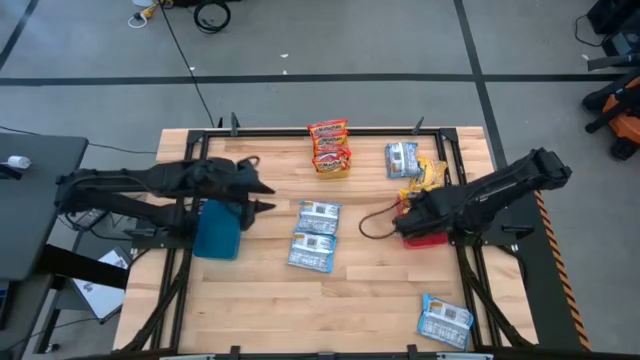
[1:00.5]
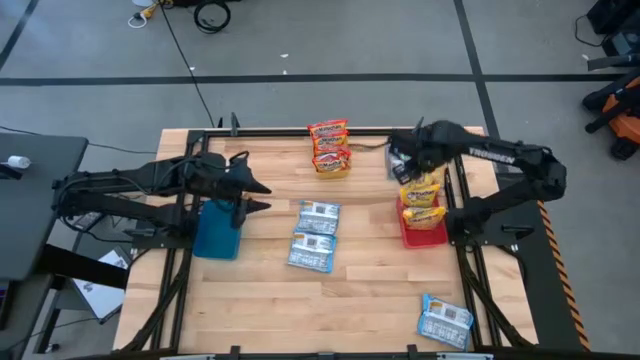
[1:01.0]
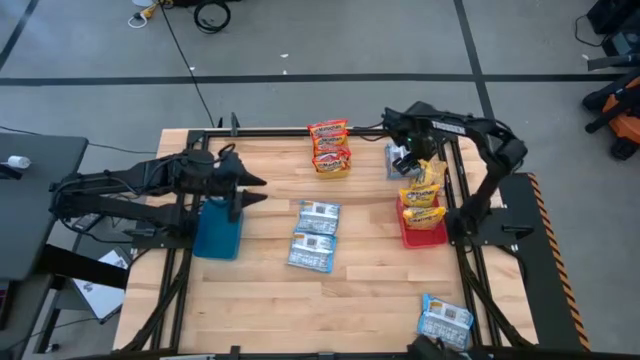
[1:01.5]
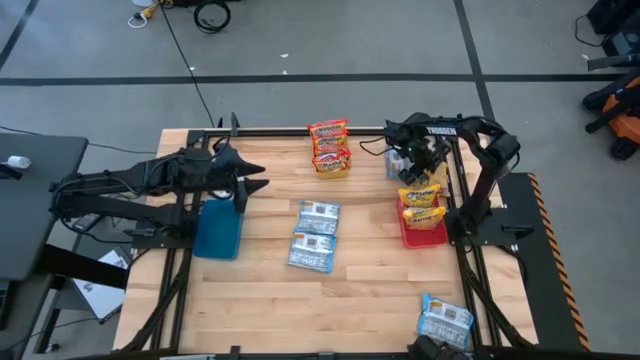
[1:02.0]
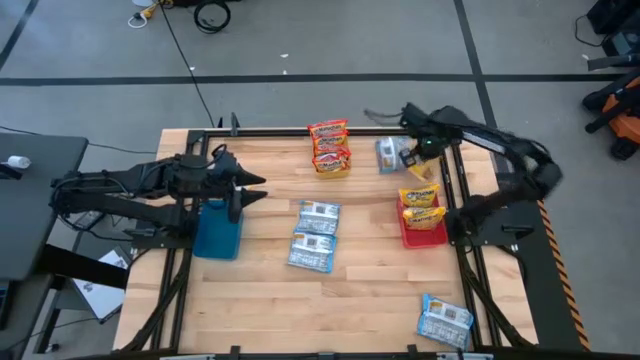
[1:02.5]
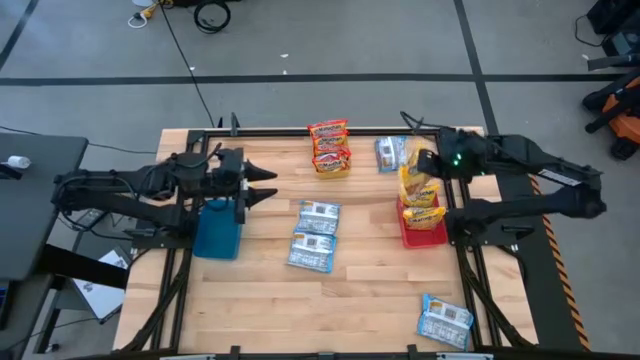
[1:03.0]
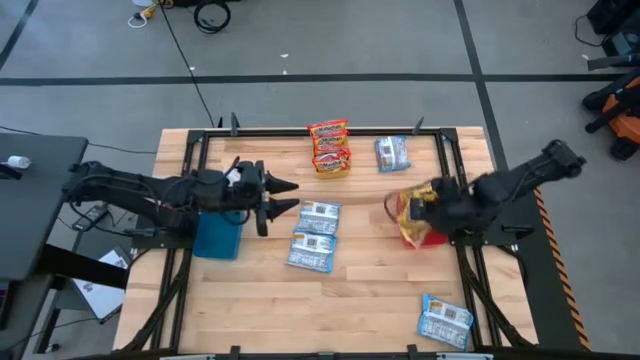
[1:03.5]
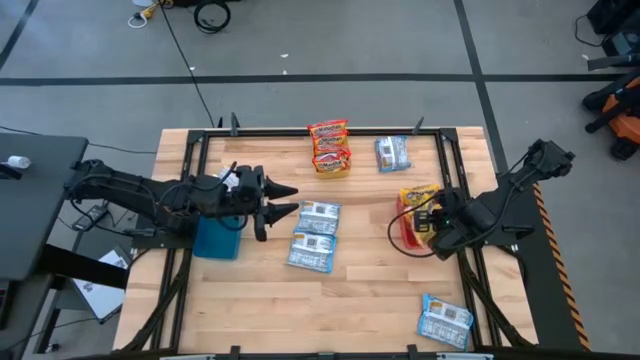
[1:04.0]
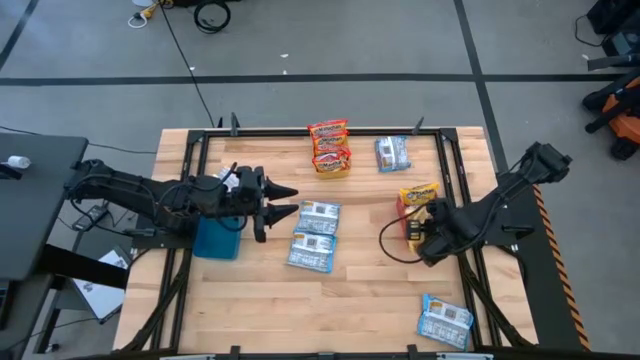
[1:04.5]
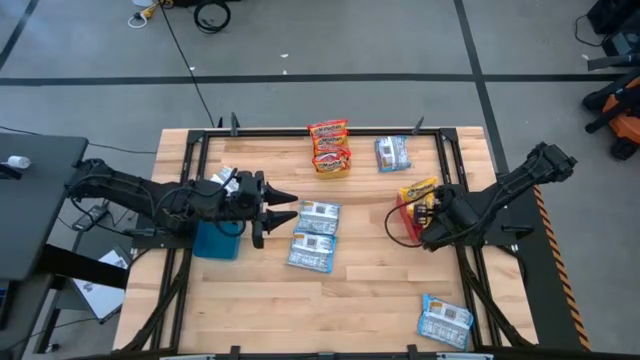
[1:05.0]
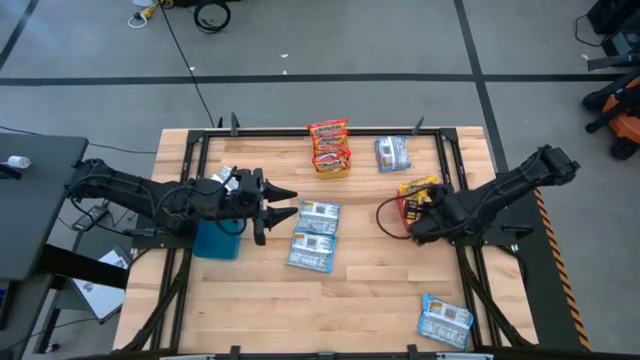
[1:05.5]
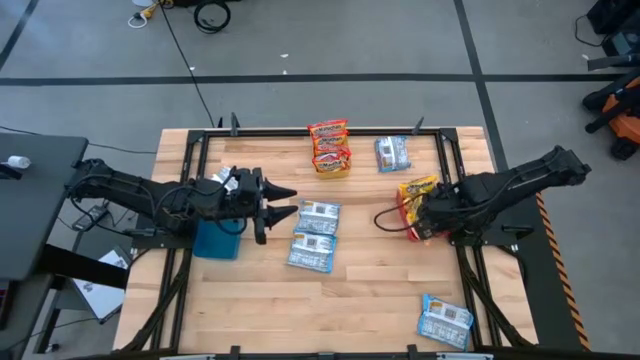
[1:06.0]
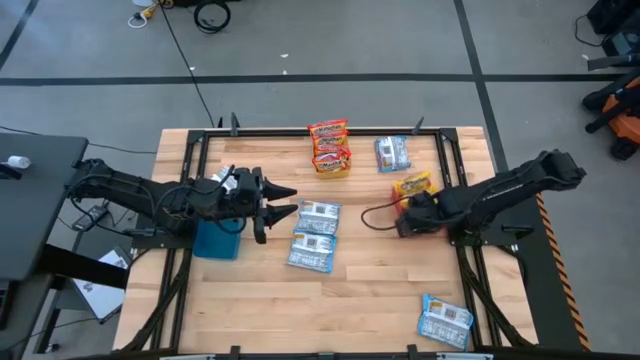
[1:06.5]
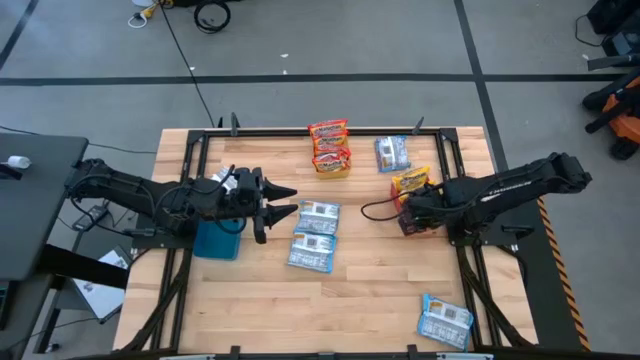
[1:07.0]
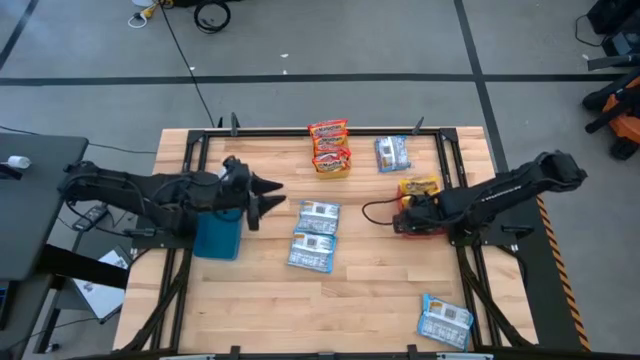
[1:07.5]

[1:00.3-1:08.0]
Task: Sort Maruchan noodles
Put the right yellow noodle pack into the red bin

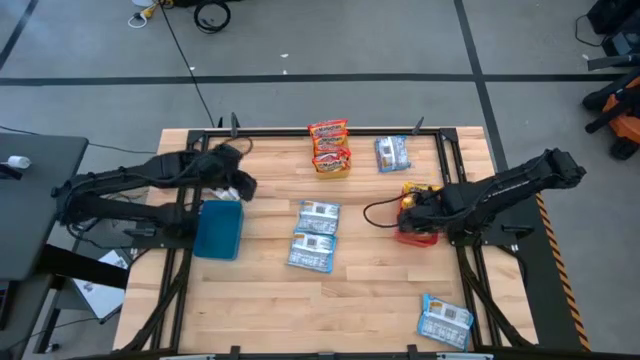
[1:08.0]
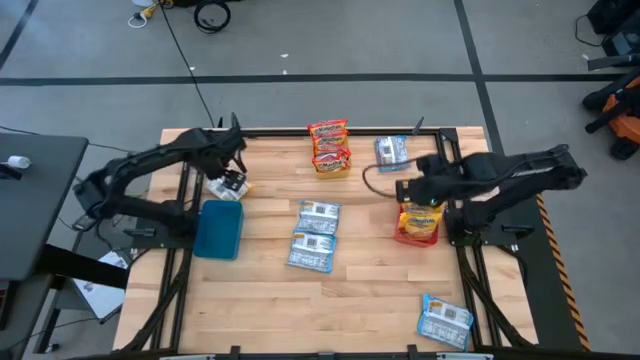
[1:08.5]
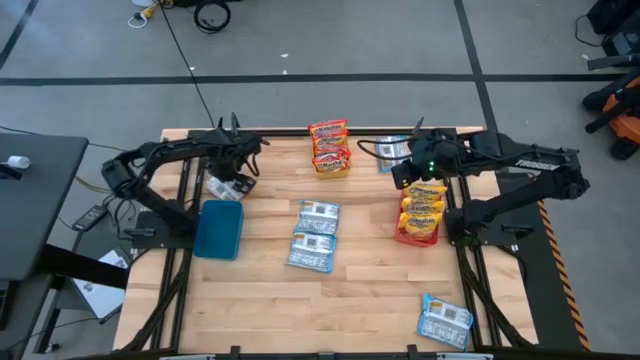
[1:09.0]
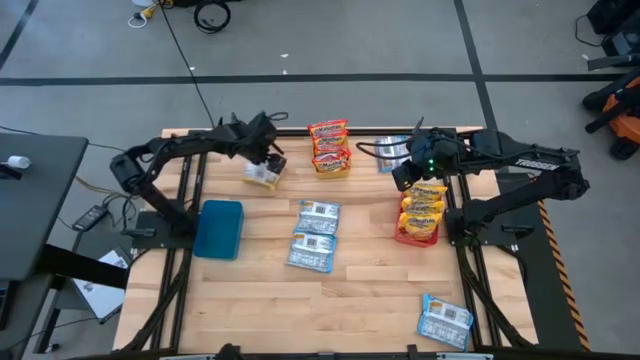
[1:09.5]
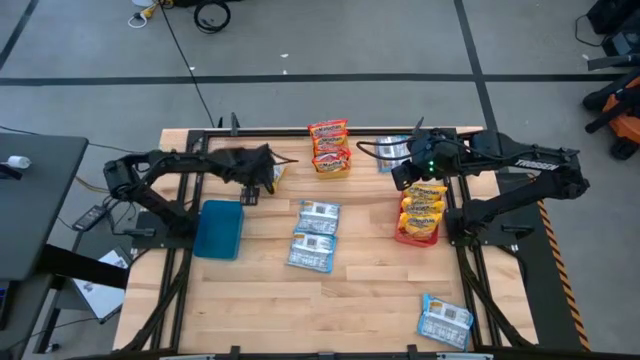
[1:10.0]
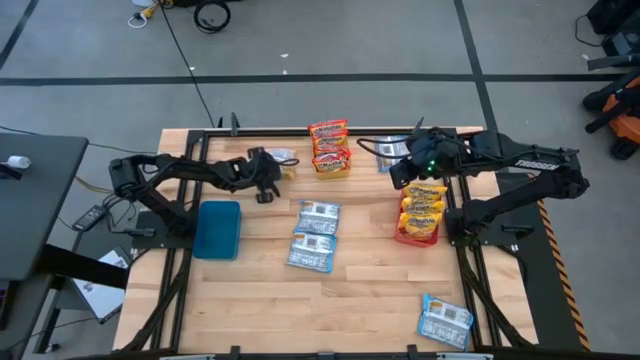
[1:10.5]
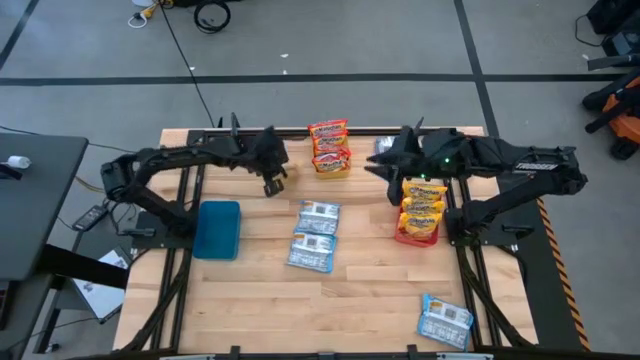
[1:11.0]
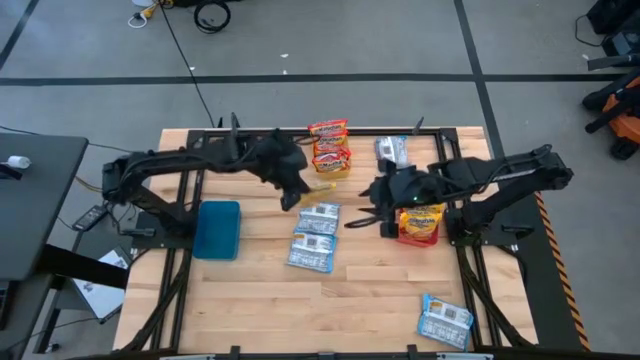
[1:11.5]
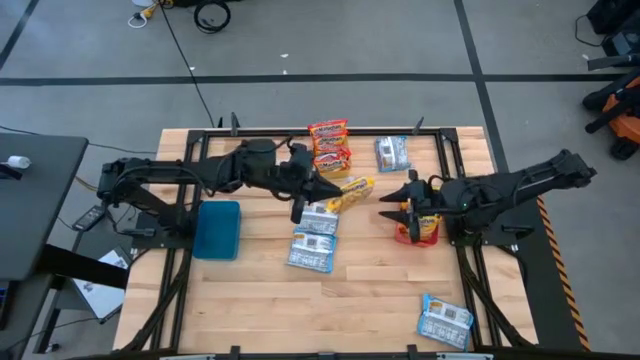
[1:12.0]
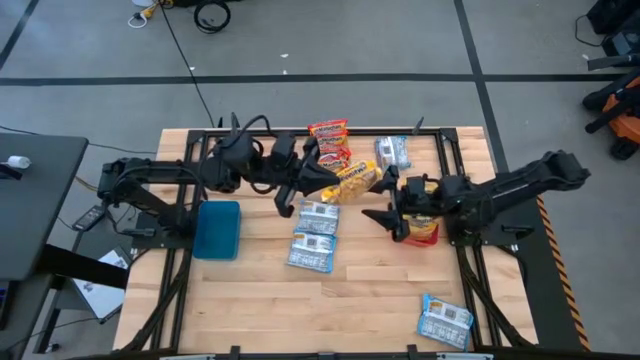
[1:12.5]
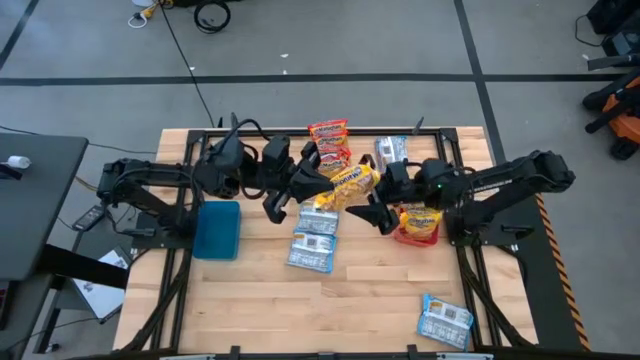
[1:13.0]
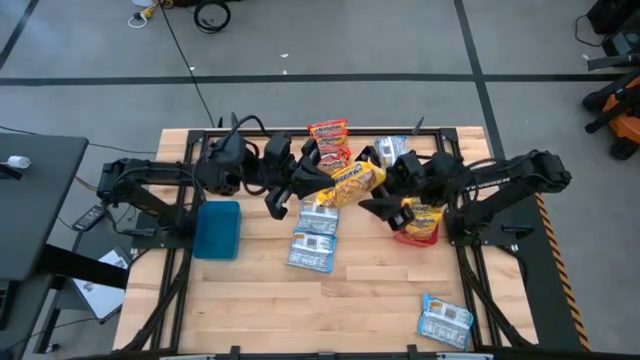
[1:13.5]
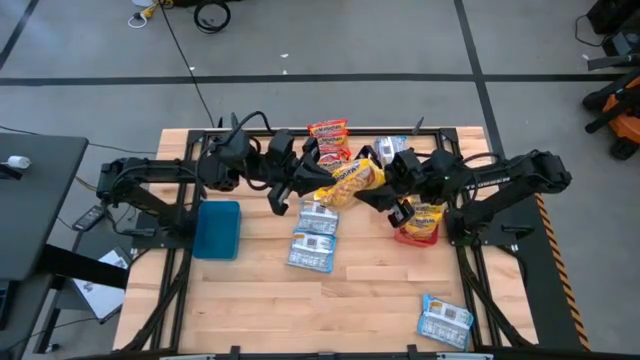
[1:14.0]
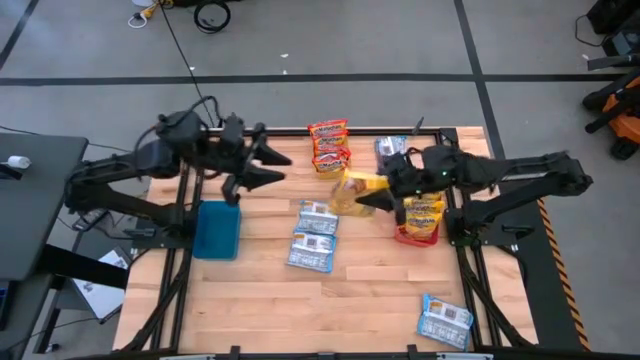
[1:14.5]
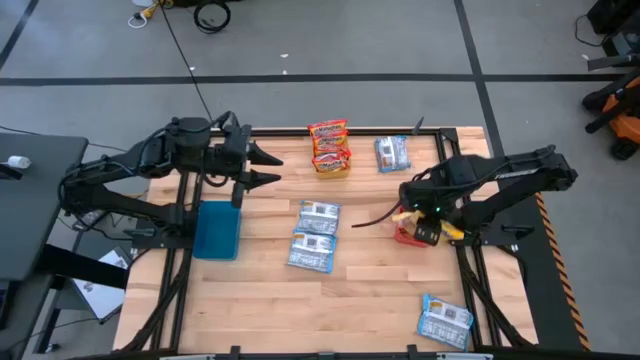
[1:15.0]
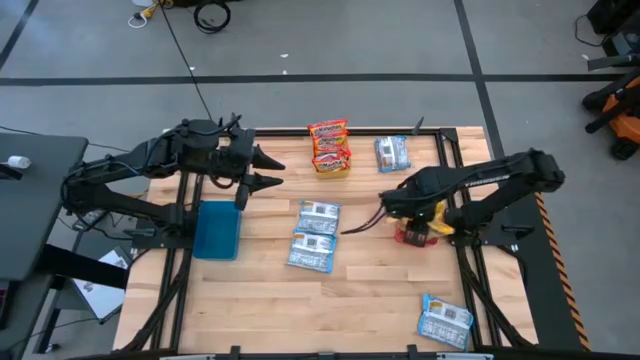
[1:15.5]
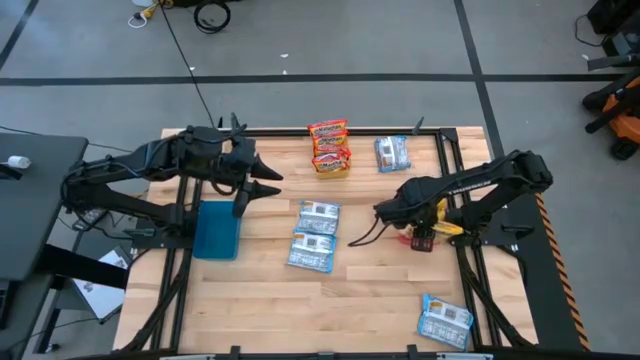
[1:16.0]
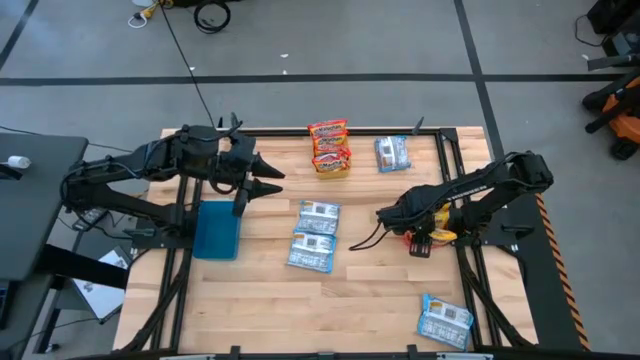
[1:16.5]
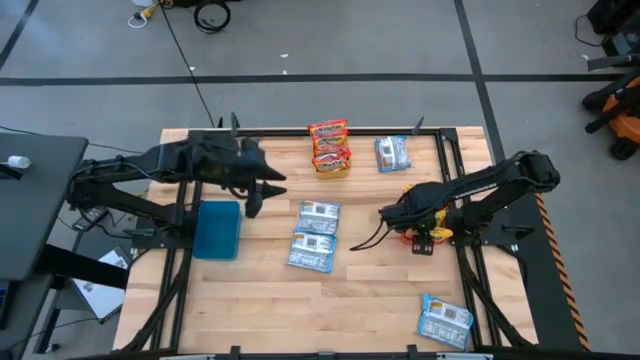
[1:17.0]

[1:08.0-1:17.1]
Put the yellow noodle pack into the red bin

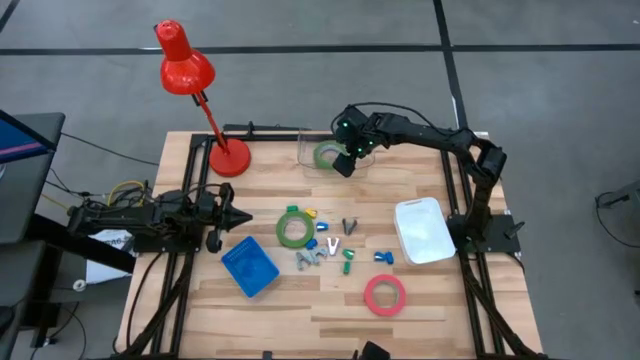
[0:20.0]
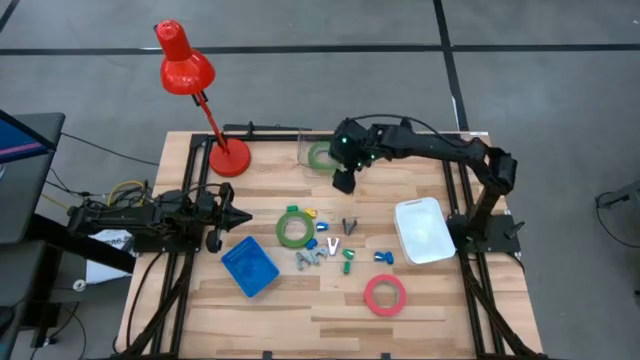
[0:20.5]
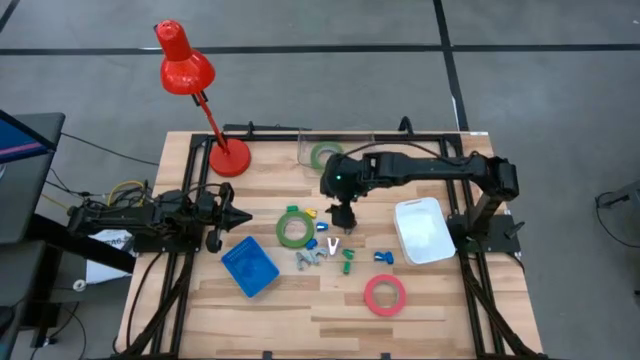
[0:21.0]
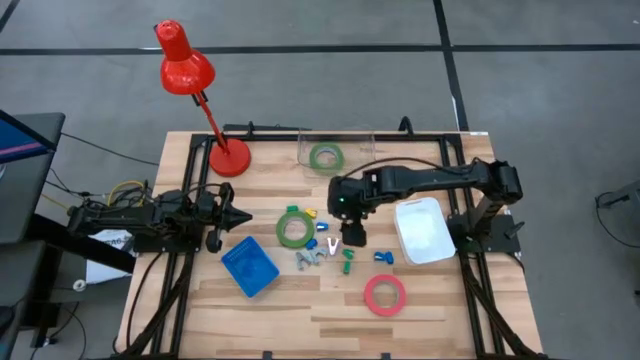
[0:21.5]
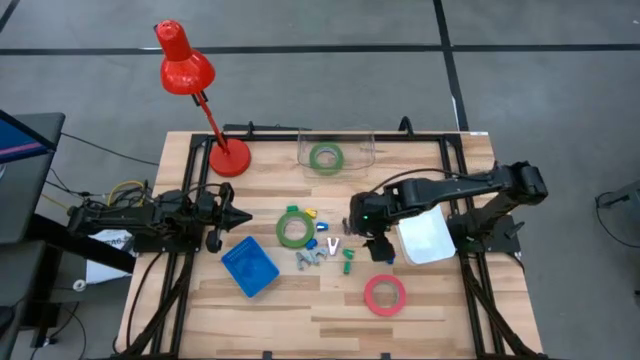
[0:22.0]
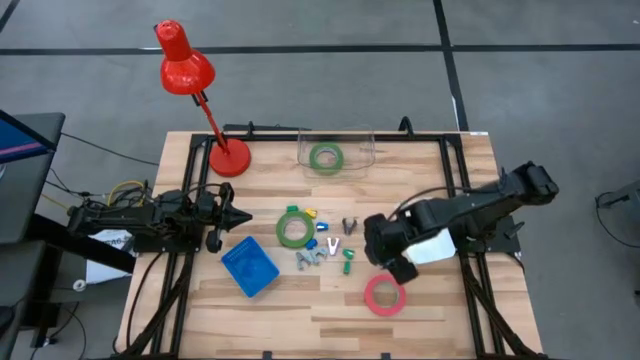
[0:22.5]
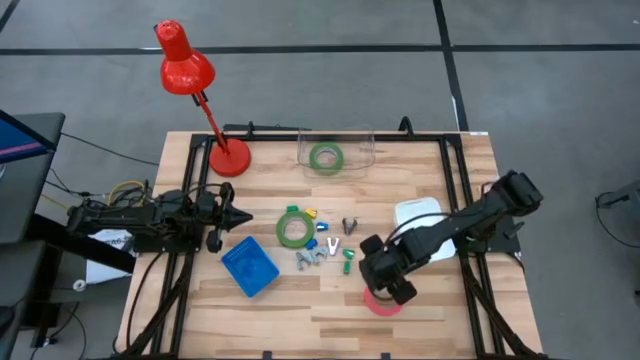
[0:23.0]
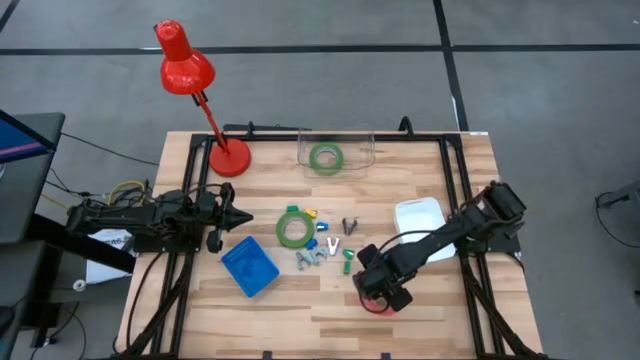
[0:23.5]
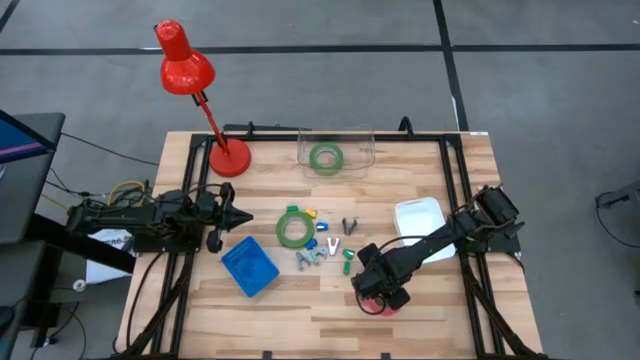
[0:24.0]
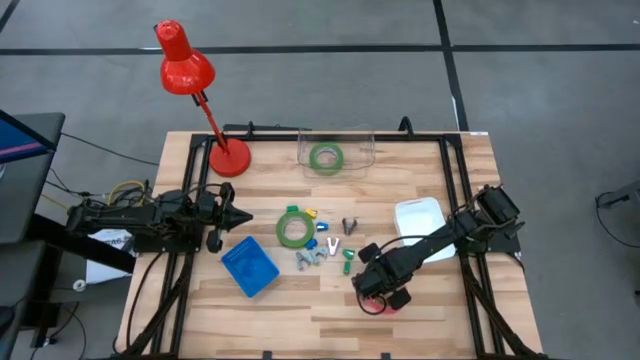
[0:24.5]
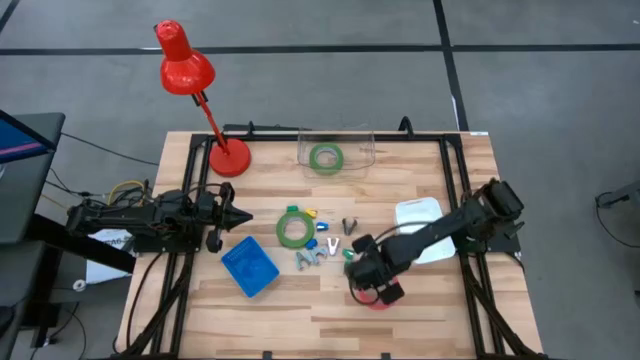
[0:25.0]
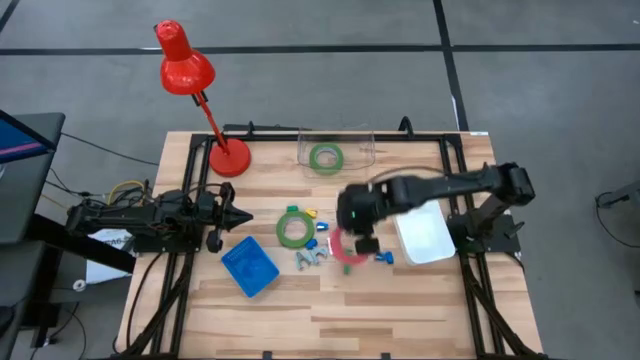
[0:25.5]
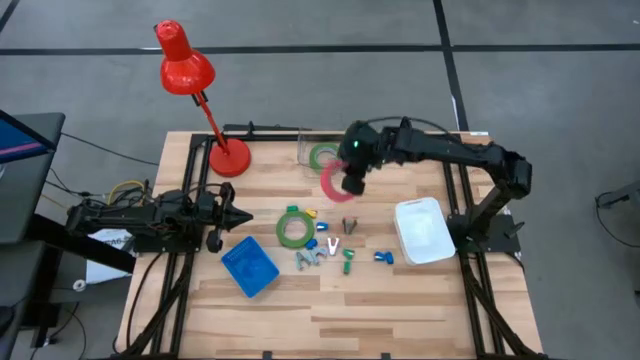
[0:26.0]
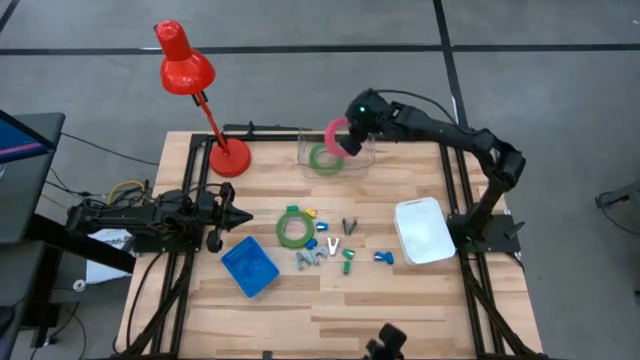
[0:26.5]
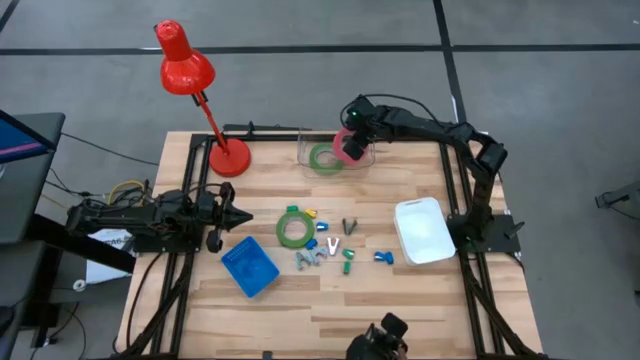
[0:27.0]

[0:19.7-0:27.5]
Task: Pick and place Stapler, Stapler remover, tape
Put the pink tape into the transparent bin
